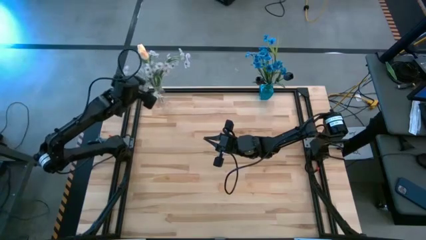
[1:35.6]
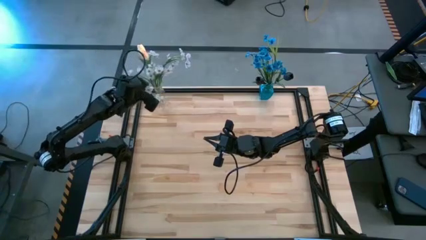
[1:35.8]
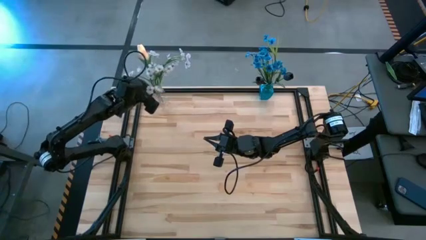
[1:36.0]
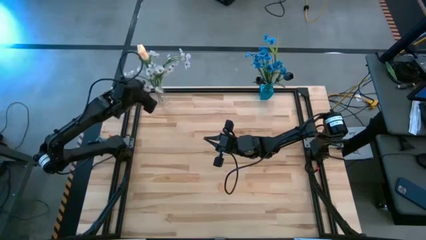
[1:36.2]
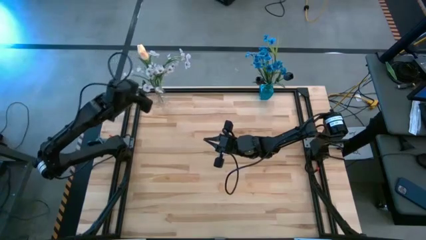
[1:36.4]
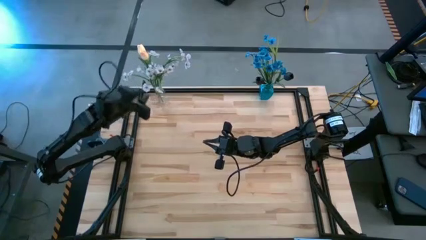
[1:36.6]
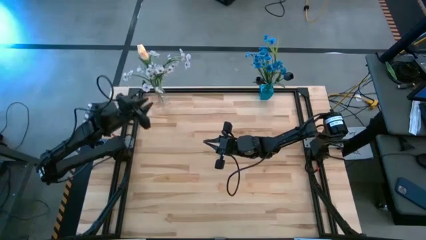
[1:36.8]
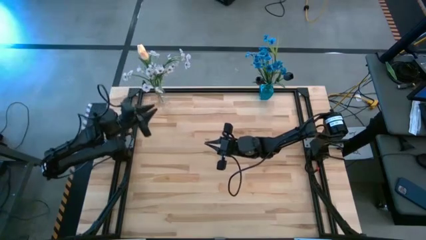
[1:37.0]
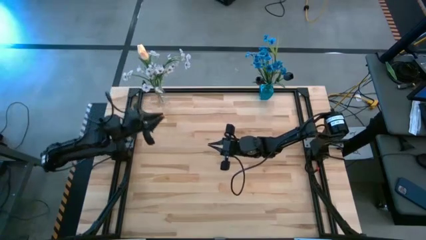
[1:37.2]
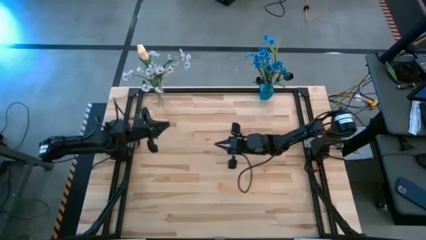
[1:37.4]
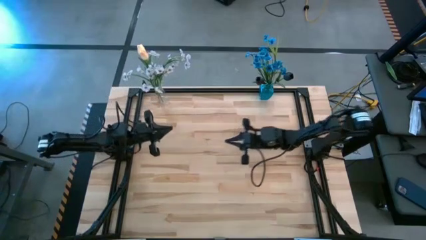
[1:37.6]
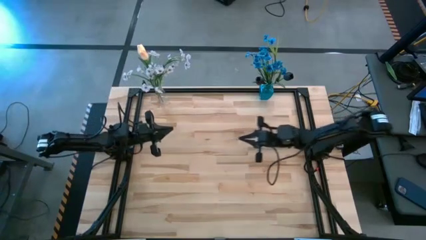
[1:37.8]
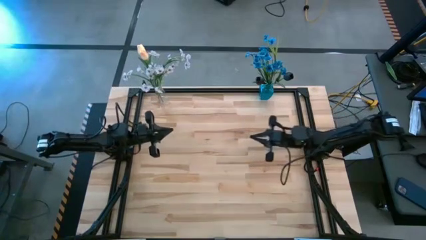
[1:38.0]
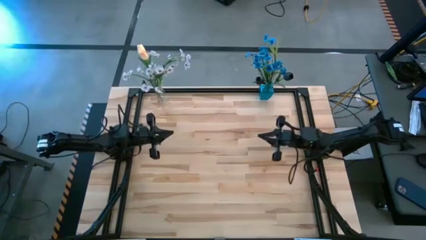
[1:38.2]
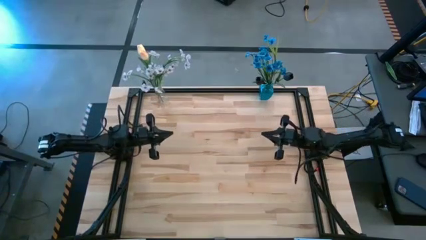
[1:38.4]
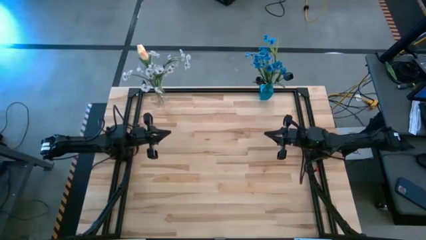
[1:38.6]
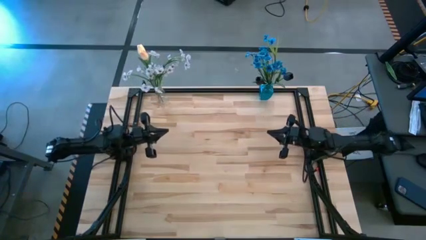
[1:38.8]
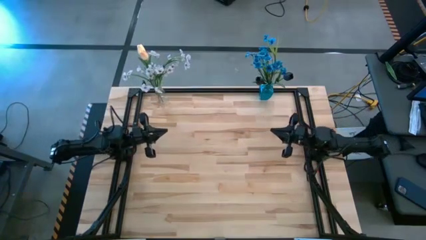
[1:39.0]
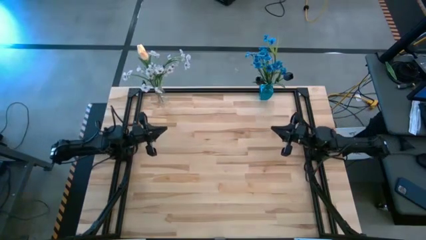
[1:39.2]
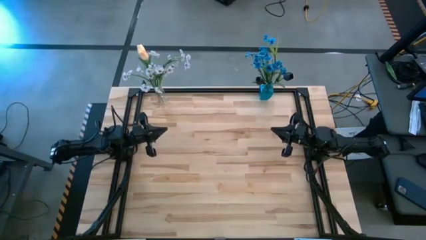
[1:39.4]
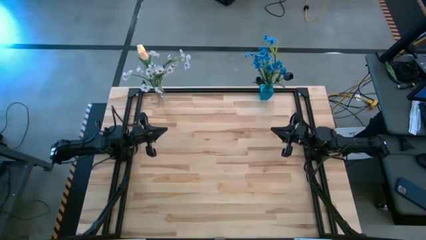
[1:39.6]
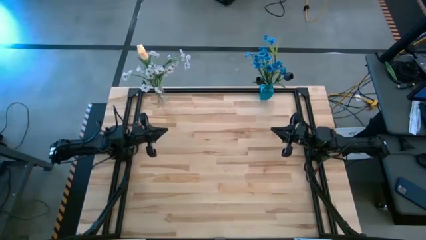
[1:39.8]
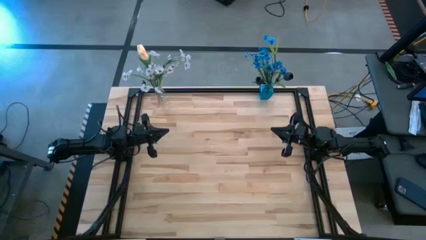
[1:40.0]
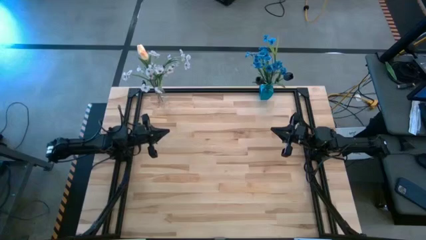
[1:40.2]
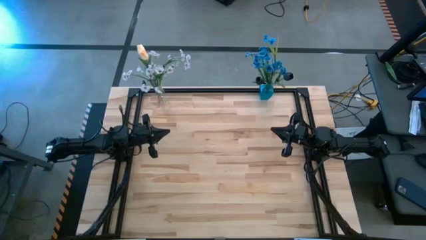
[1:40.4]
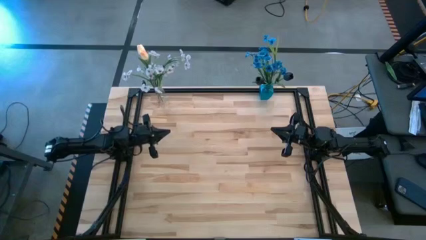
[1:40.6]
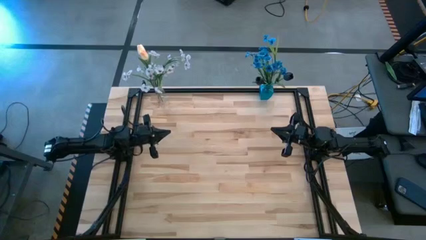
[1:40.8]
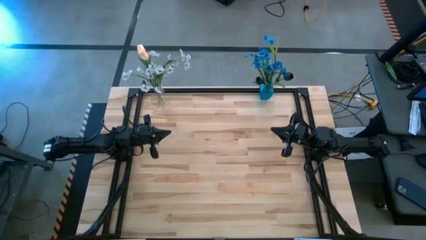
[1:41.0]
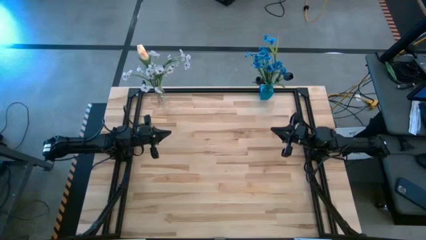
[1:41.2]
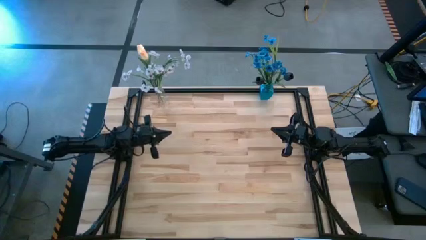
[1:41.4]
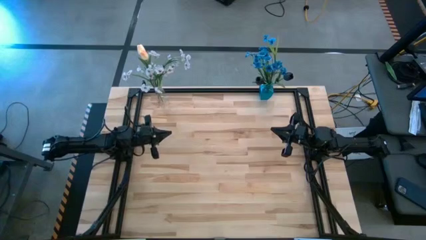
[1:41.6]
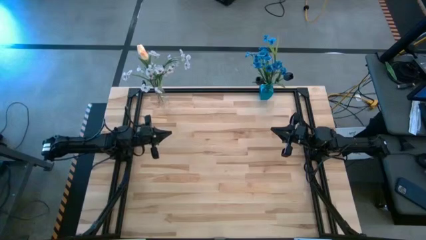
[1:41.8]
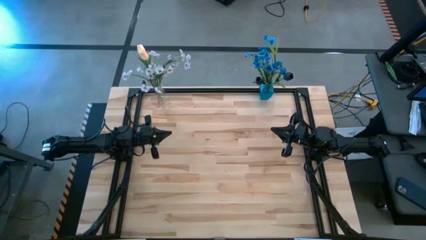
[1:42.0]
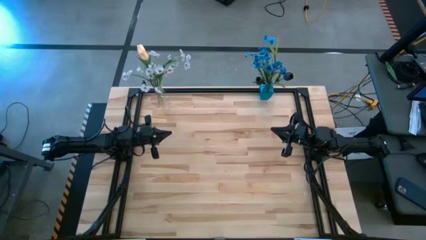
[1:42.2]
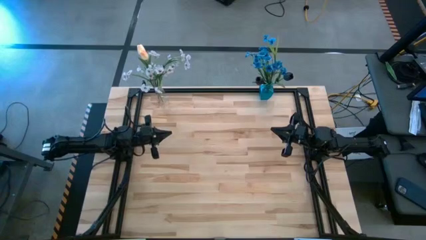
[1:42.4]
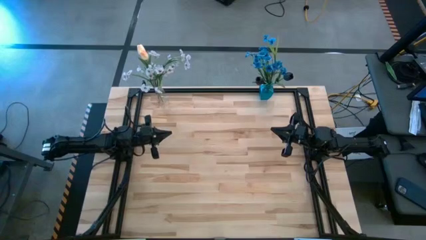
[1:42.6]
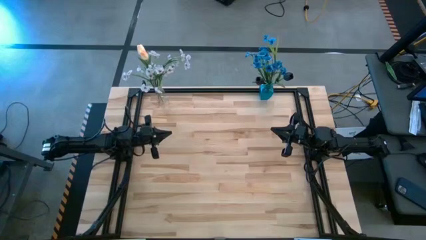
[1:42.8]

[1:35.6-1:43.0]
Task: Sort flowers into vase by color
Return to Home Position

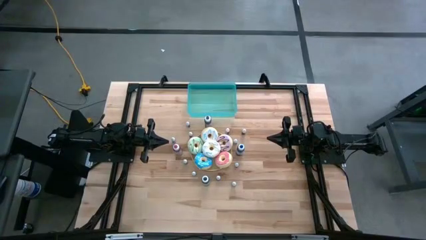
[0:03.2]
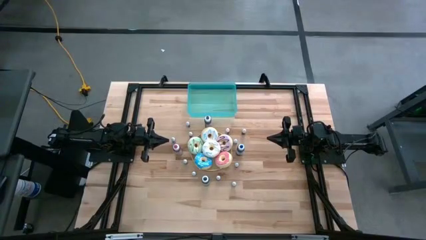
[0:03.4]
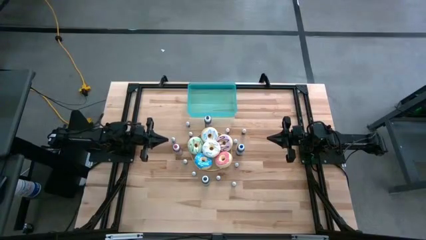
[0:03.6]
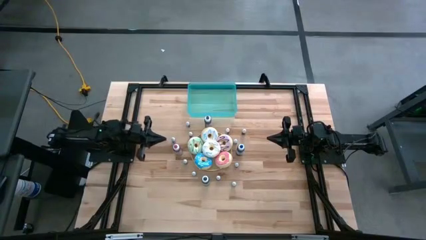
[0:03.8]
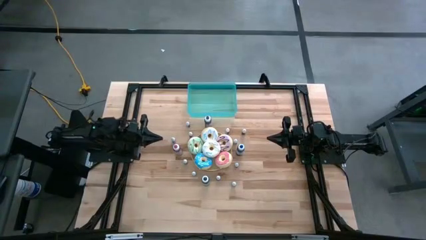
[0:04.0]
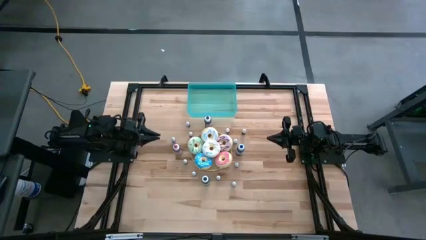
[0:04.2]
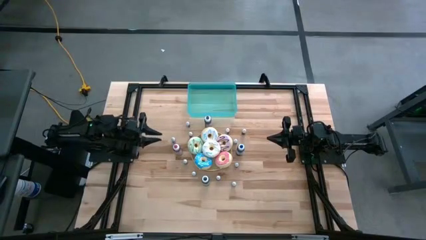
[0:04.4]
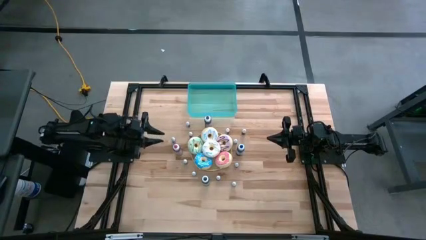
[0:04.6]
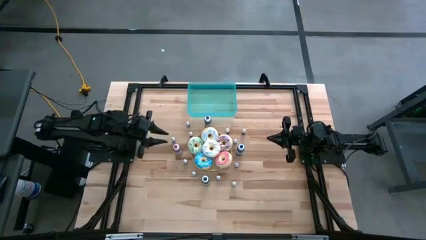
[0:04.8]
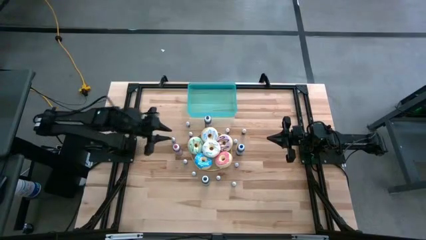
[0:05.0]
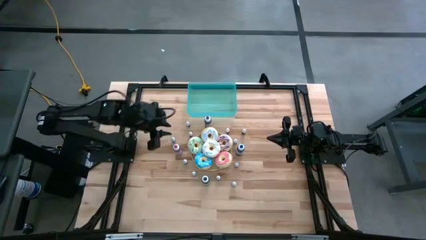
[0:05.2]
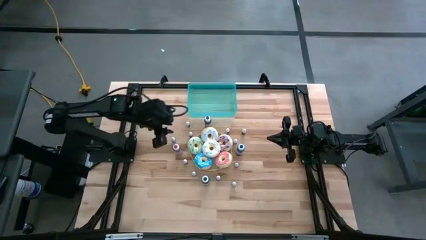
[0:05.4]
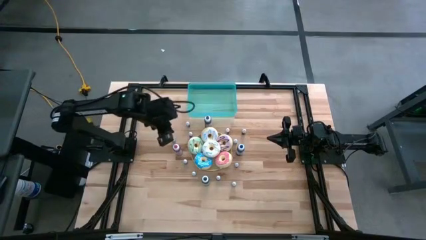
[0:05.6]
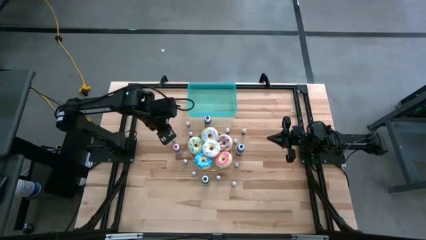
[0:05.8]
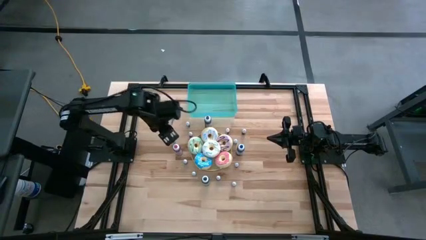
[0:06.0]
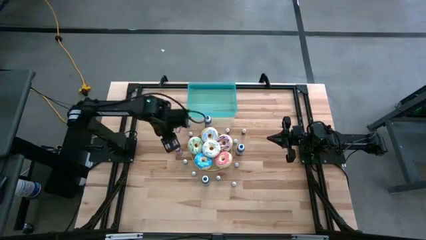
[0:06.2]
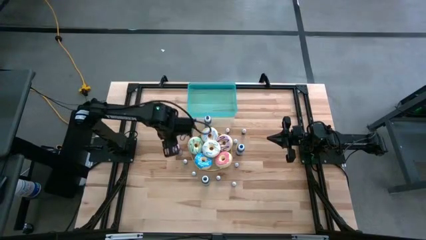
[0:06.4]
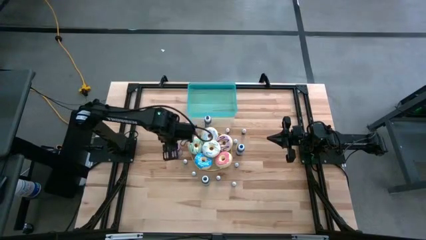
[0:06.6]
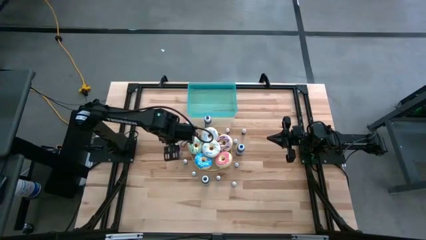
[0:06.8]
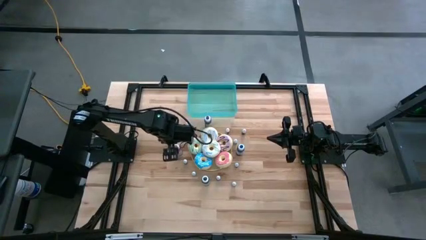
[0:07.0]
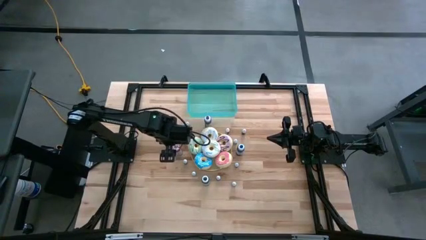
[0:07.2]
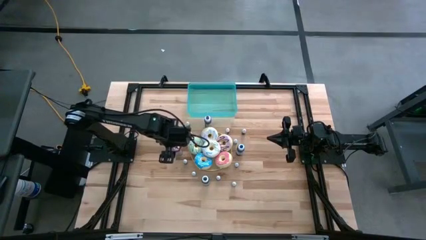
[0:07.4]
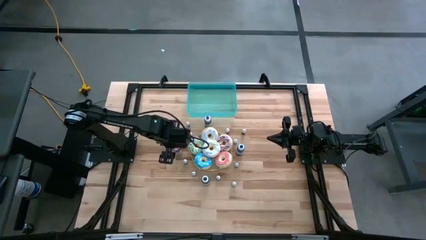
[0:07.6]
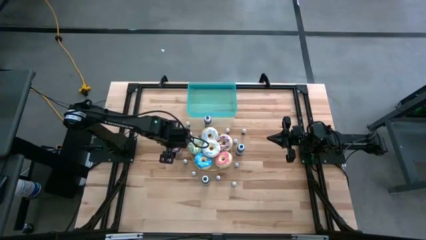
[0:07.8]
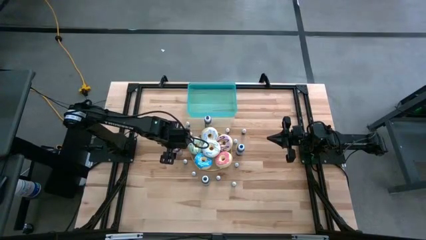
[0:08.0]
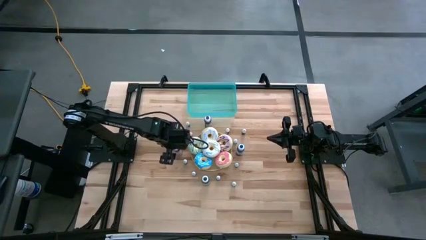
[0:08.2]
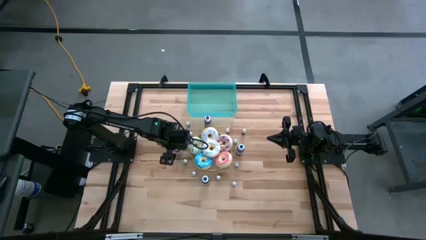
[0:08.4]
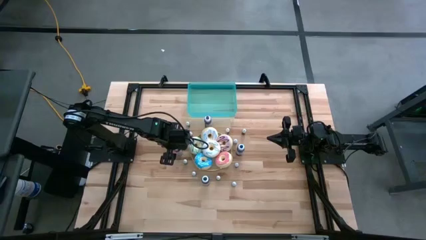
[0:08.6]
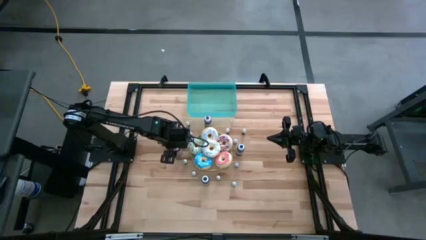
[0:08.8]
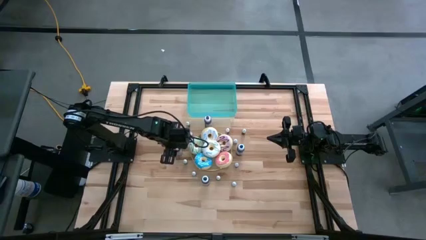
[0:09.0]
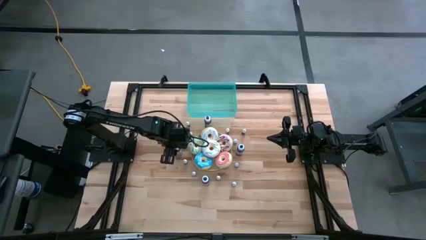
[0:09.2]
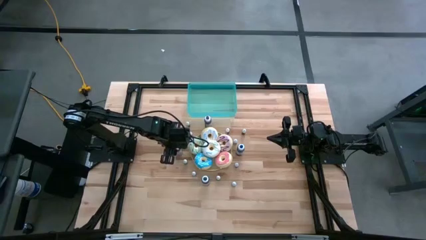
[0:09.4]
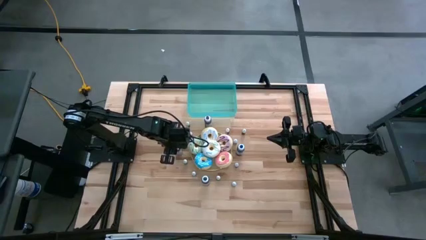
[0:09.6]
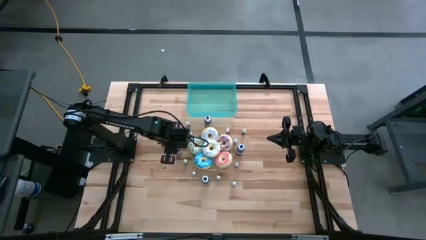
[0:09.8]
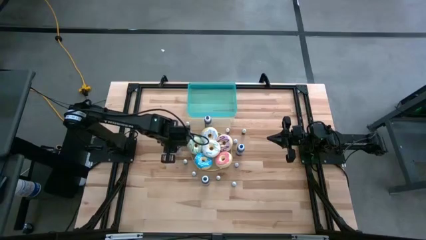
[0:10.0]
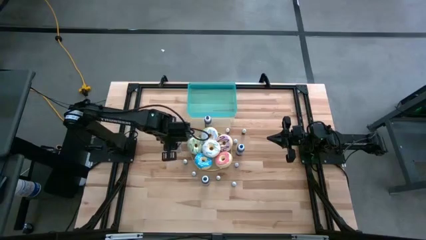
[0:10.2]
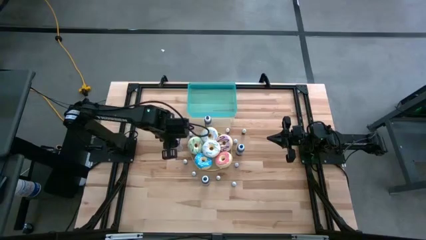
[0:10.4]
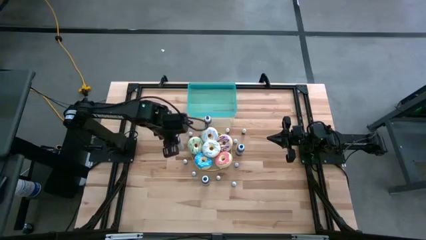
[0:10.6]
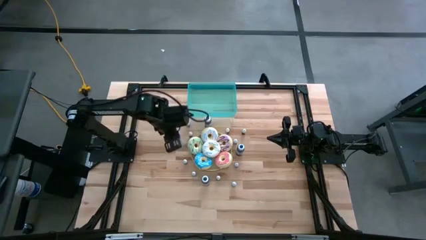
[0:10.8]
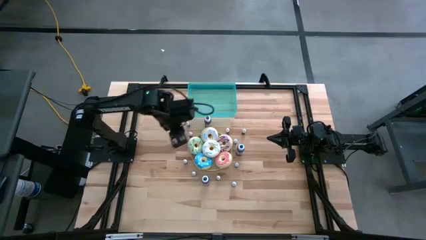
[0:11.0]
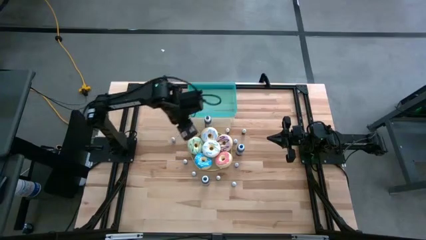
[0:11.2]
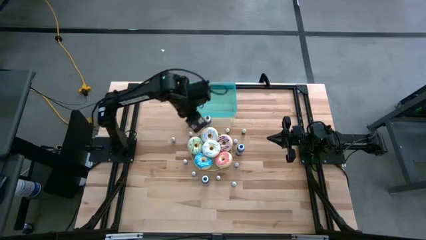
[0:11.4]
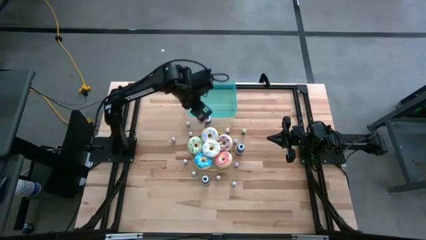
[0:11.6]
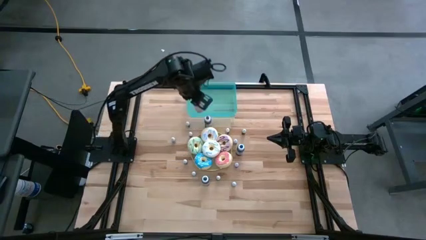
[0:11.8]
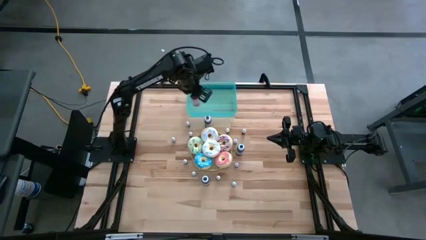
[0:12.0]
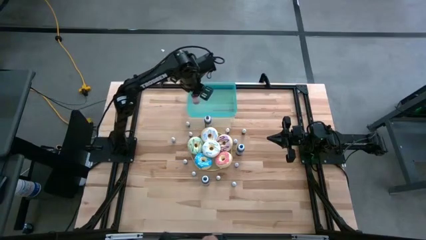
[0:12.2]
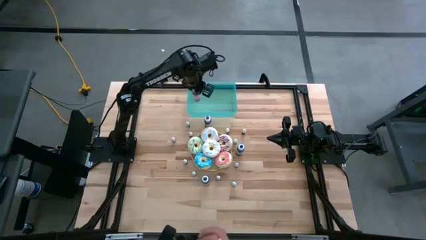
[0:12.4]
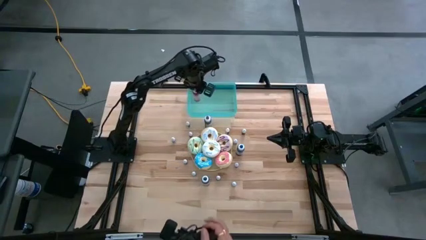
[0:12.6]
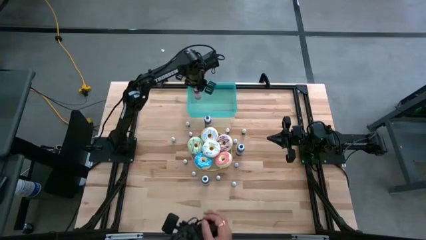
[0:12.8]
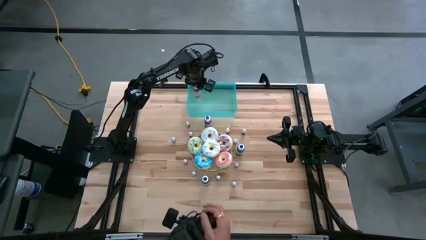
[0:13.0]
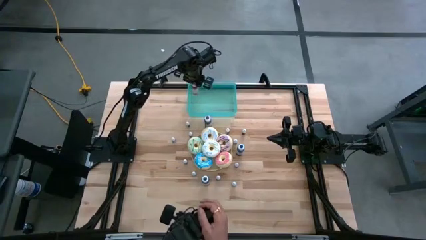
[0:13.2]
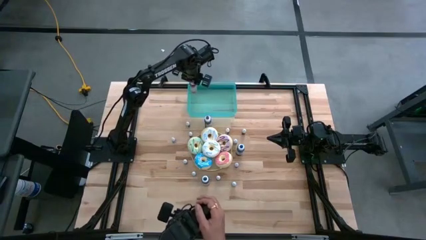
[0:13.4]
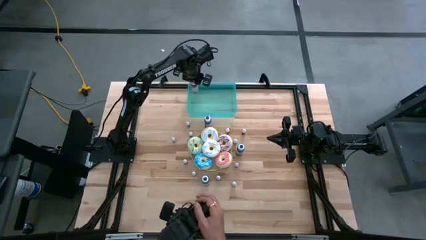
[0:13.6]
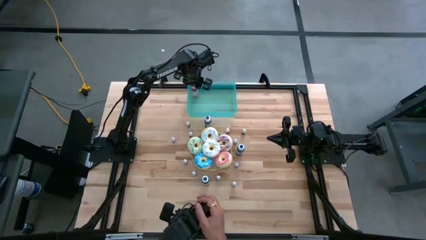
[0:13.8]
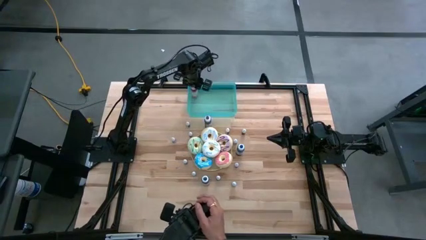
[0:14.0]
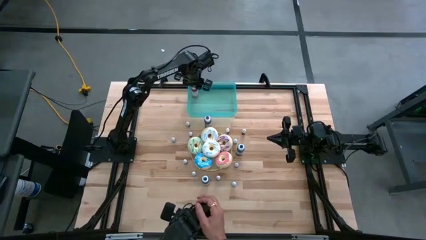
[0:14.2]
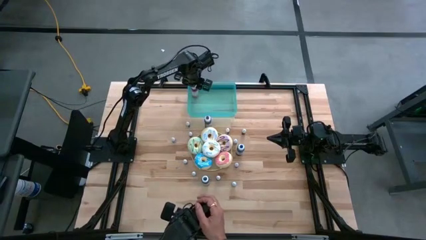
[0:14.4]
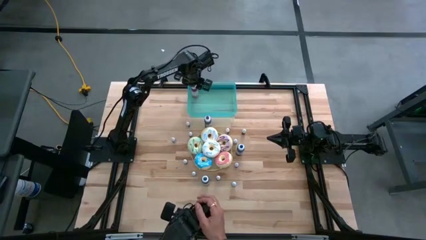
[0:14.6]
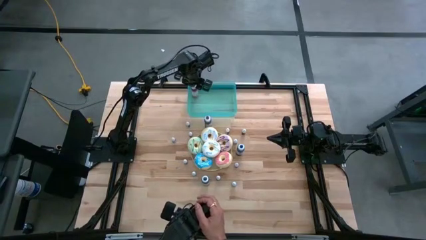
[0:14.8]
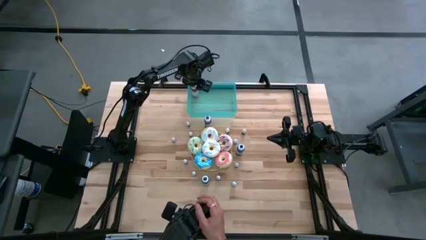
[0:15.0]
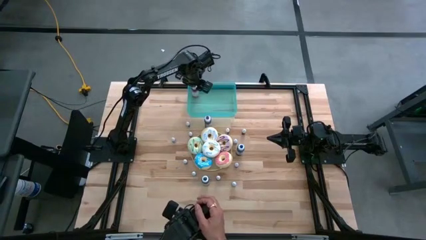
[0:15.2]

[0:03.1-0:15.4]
Task: Pick & Place food coloring
Put the large pink food coloring bottle into the green container
